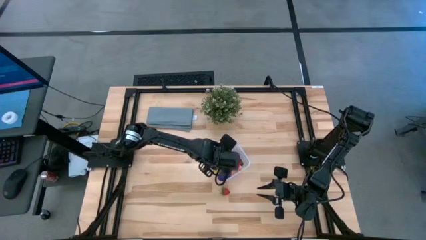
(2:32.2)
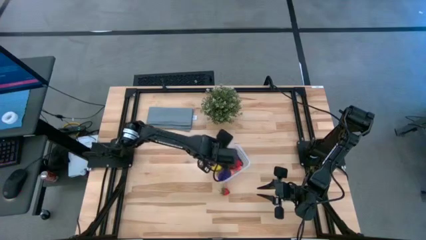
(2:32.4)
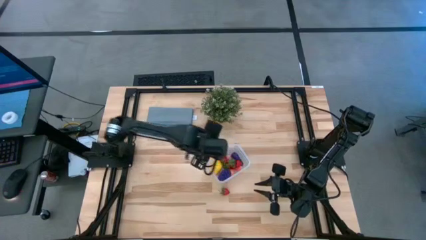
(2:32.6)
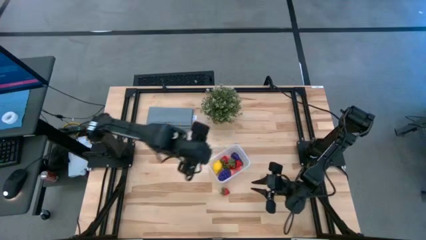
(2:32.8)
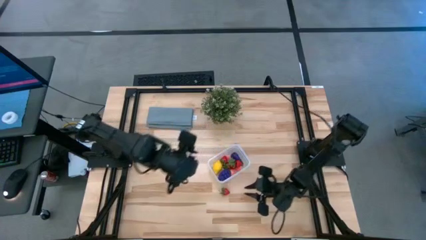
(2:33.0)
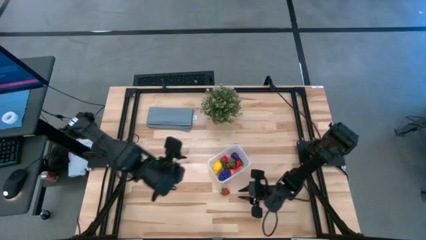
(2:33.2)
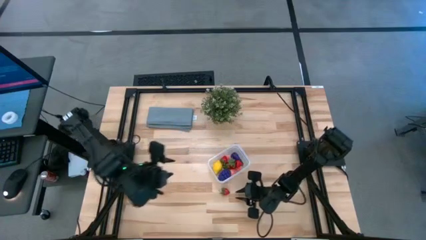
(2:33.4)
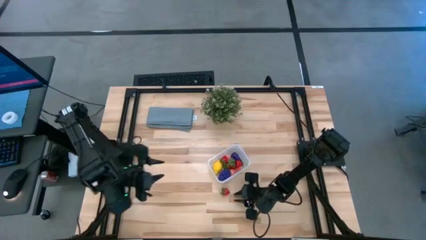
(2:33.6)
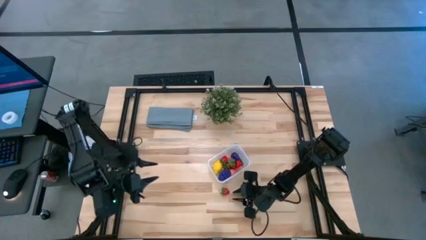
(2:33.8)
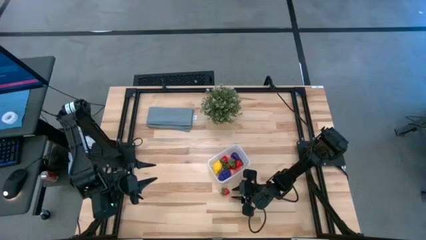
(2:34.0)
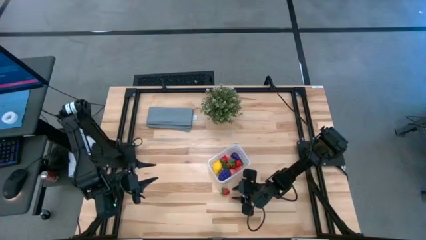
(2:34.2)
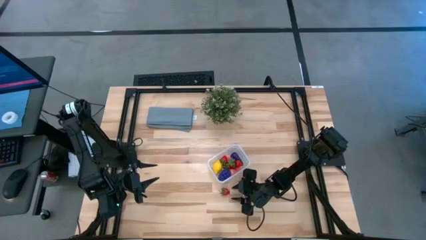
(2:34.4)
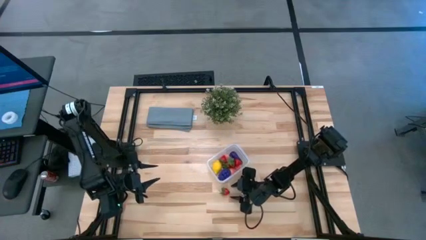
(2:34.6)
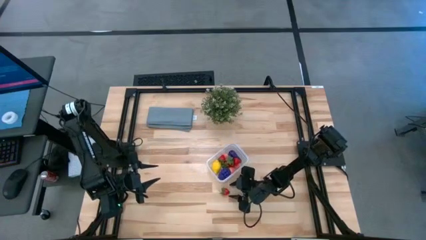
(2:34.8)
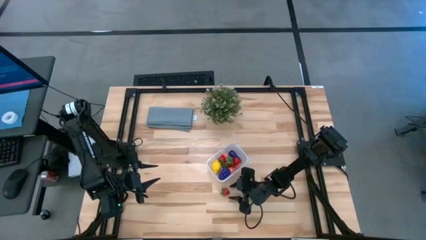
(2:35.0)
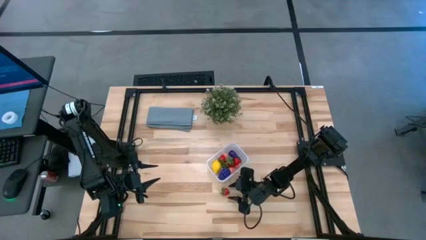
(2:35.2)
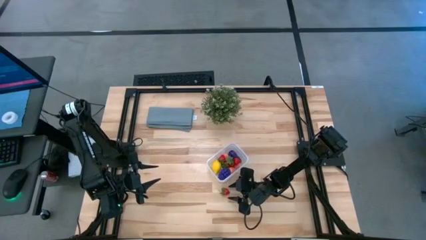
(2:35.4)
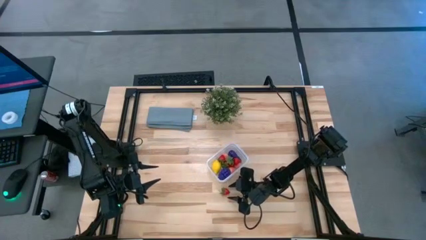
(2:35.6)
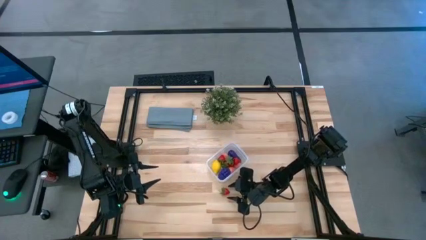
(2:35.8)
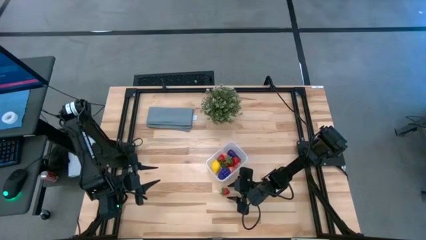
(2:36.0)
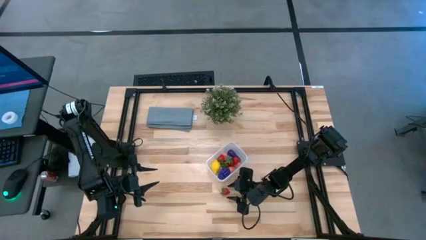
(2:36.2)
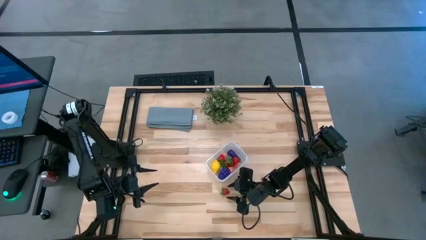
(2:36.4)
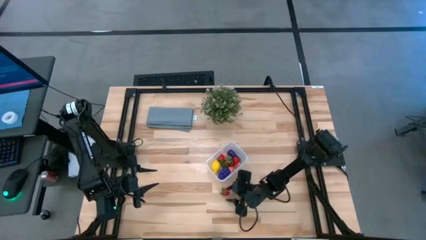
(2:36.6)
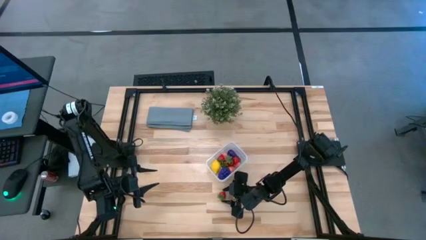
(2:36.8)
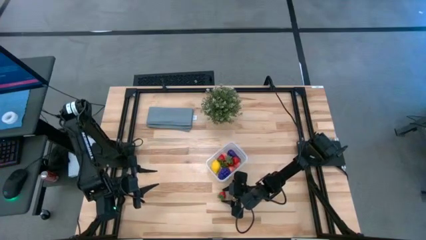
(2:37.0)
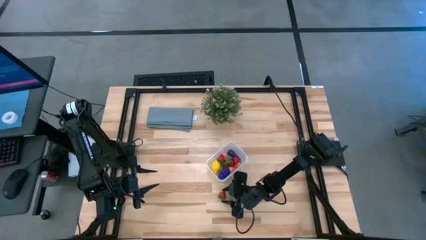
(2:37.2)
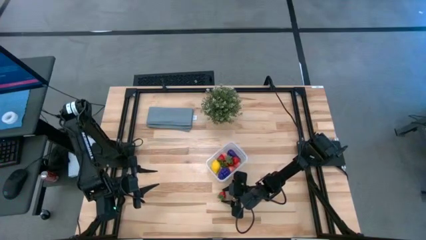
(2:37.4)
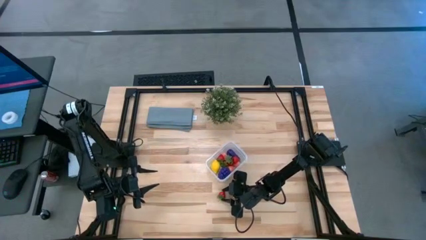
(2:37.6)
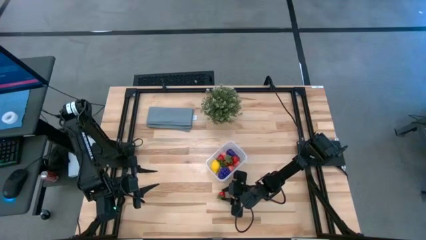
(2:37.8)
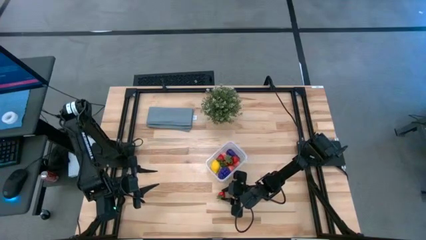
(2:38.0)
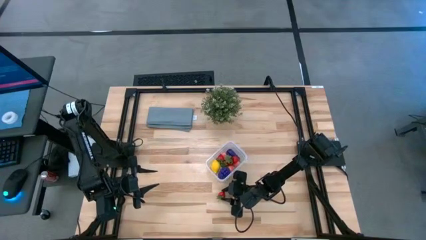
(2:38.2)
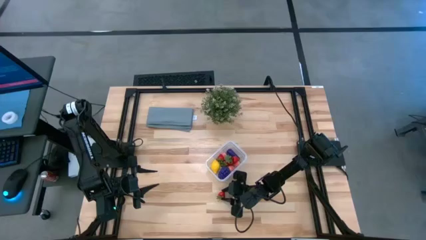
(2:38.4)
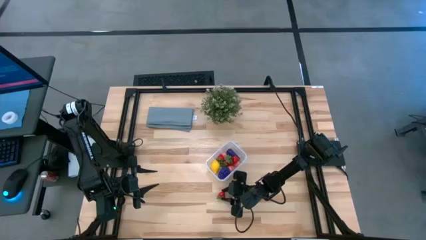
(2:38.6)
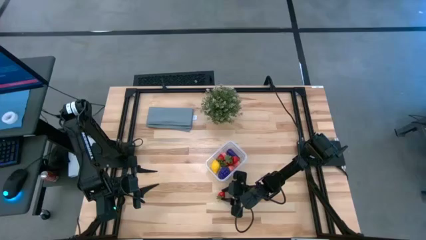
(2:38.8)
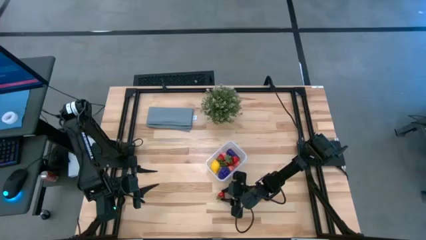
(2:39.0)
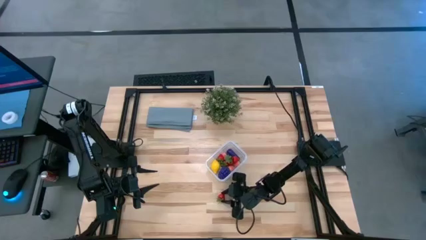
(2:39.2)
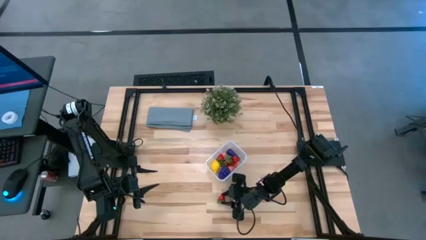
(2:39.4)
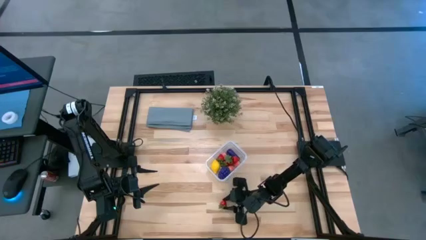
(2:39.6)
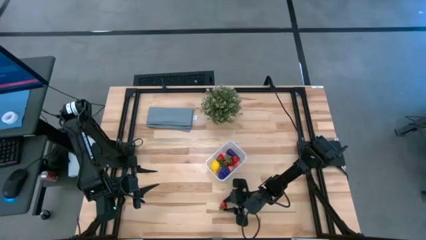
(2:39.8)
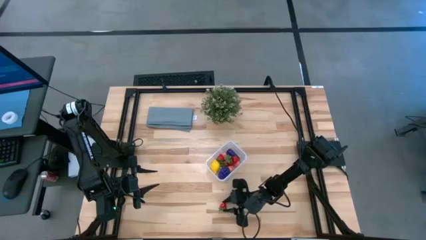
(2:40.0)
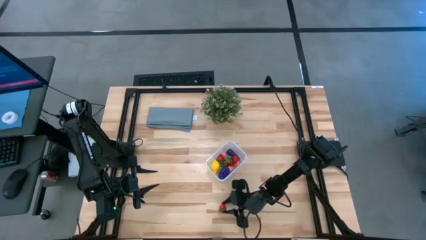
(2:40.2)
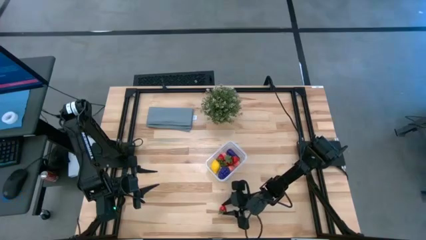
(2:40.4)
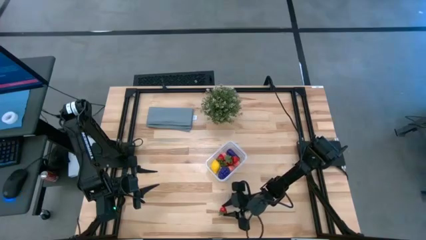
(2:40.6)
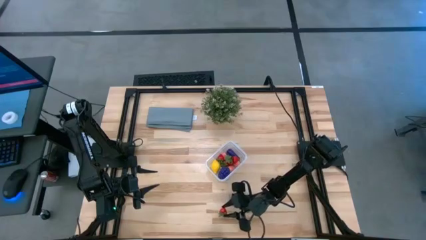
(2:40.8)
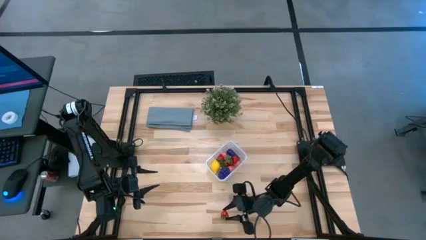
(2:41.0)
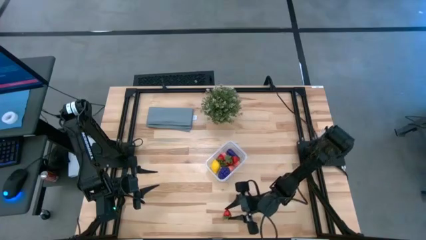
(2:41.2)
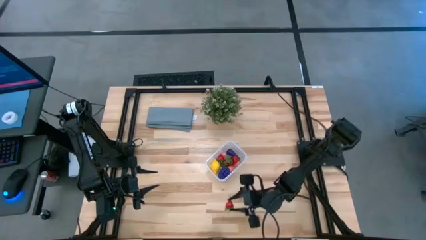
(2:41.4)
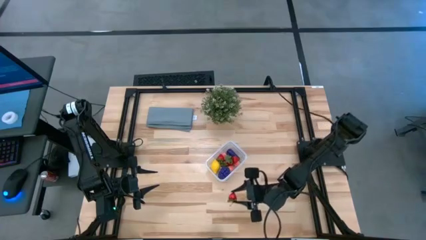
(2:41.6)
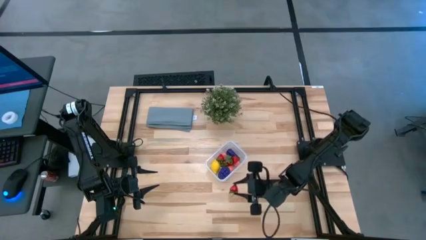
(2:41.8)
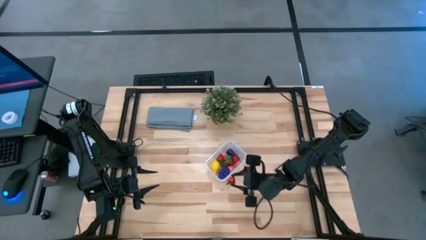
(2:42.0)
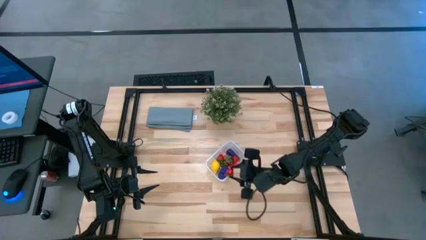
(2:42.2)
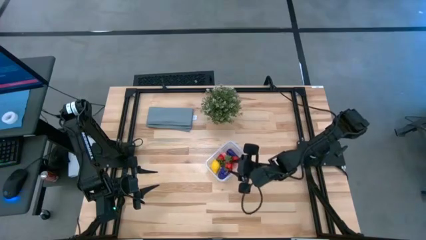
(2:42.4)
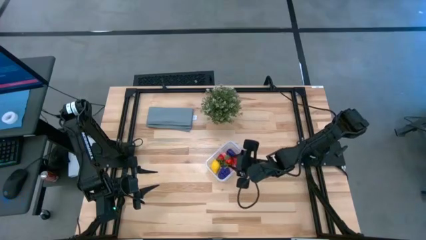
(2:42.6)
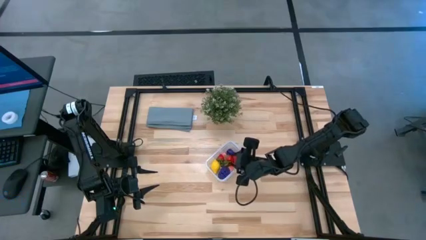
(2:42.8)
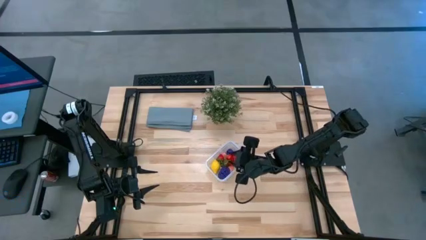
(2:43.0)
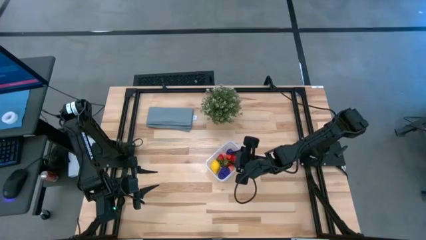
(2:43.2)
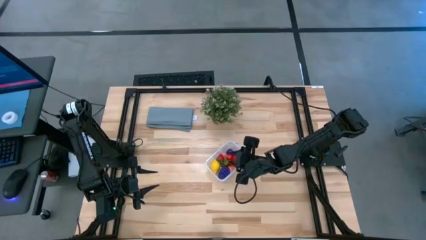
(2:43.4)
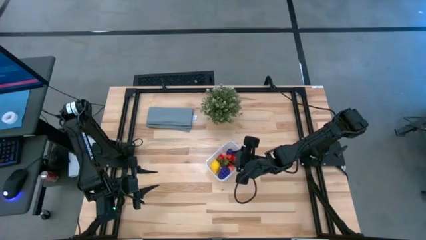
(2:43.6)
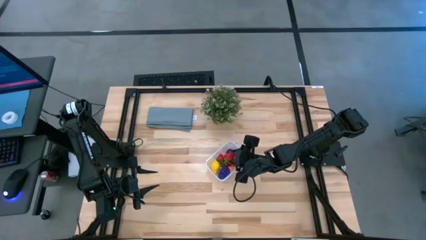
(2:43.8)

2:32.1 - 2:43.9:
Task: Pick and placing Produce into tupperware
Put the red strawberry into the transparent bin
